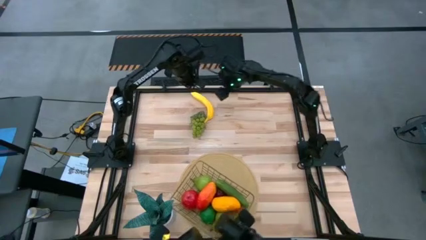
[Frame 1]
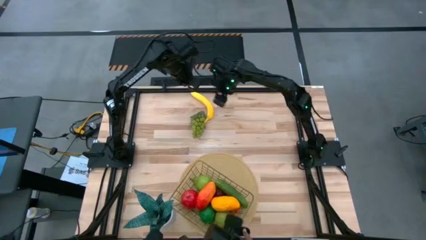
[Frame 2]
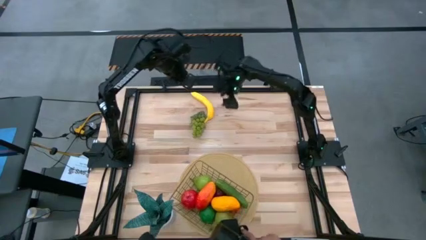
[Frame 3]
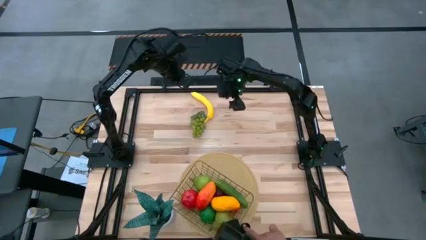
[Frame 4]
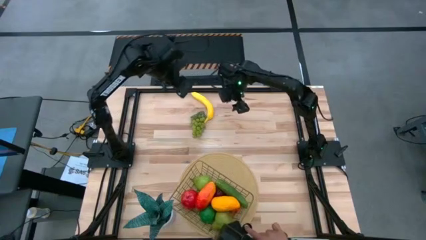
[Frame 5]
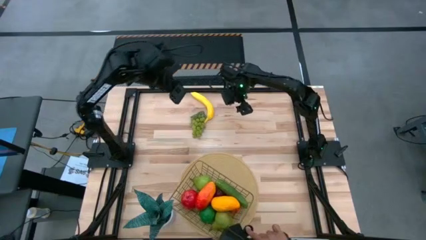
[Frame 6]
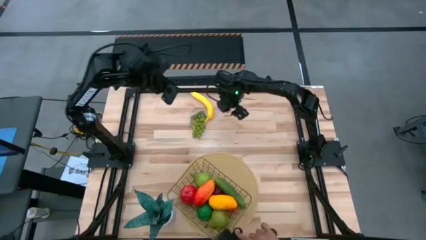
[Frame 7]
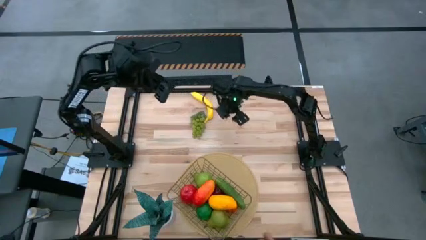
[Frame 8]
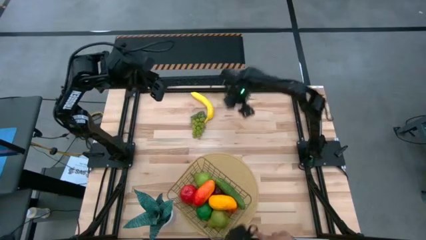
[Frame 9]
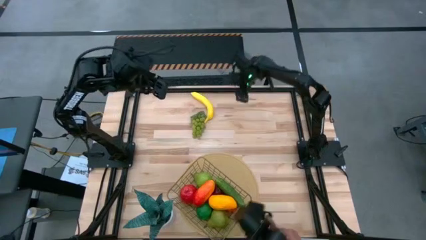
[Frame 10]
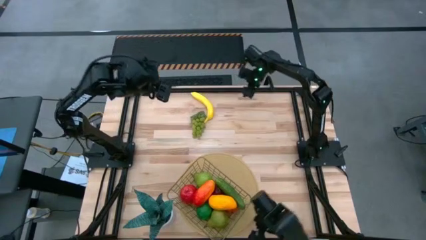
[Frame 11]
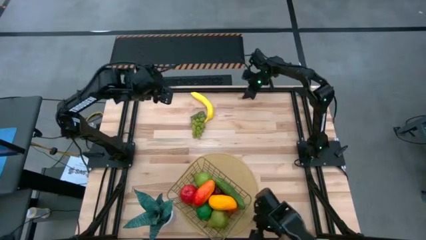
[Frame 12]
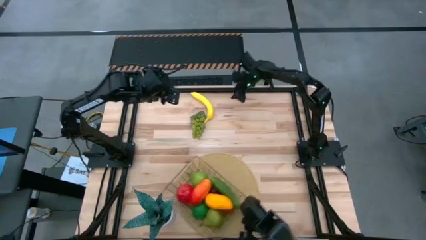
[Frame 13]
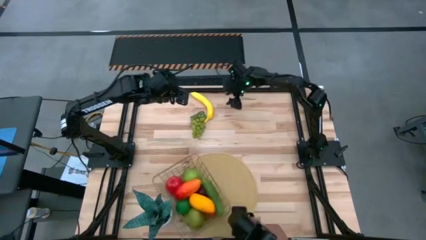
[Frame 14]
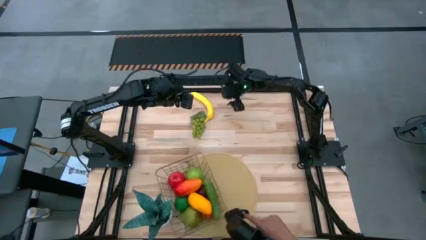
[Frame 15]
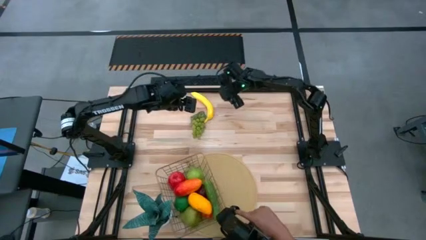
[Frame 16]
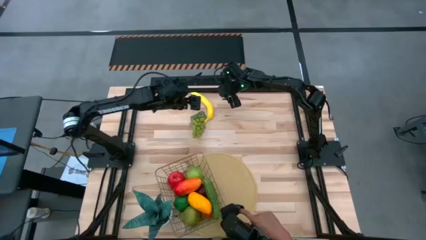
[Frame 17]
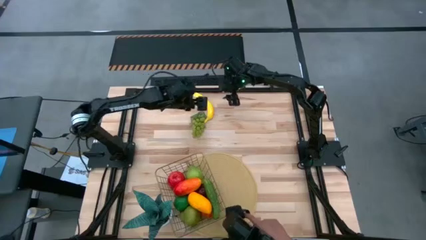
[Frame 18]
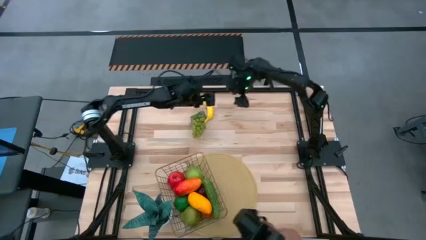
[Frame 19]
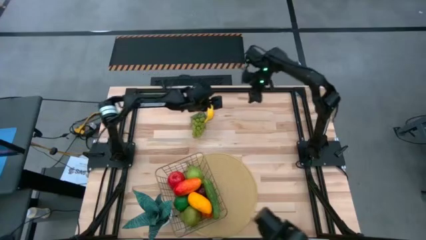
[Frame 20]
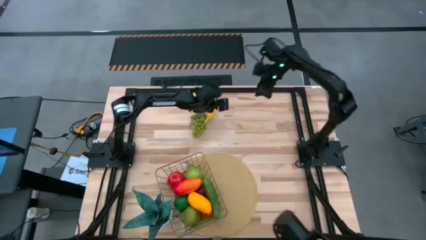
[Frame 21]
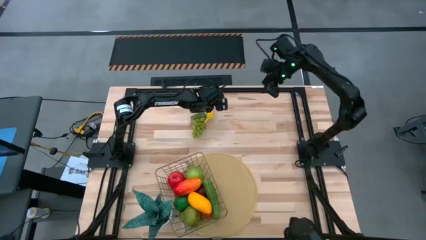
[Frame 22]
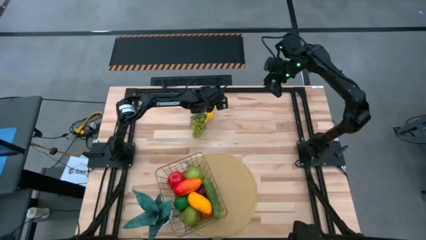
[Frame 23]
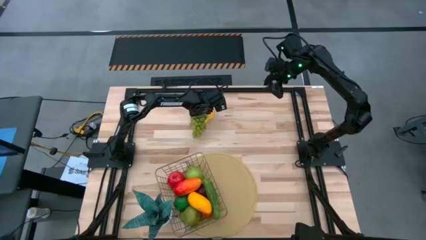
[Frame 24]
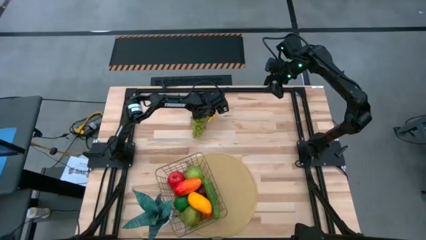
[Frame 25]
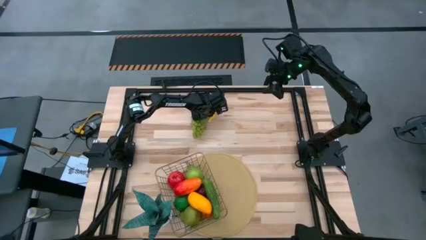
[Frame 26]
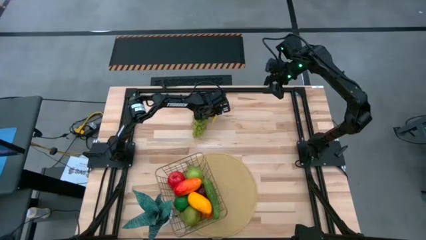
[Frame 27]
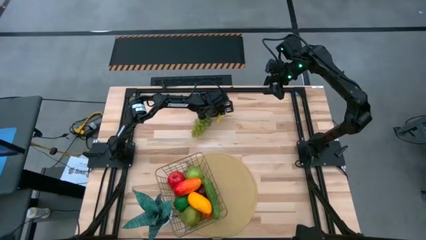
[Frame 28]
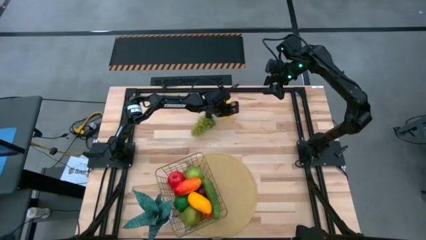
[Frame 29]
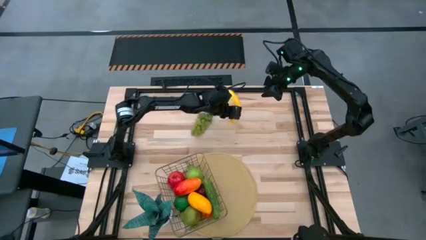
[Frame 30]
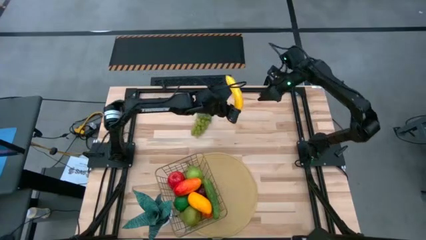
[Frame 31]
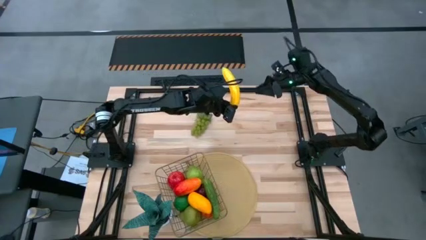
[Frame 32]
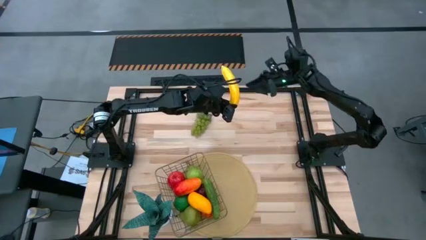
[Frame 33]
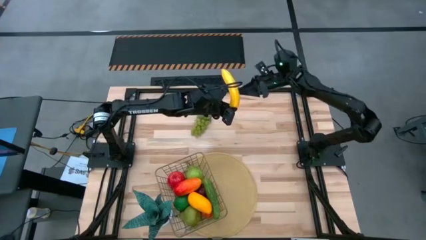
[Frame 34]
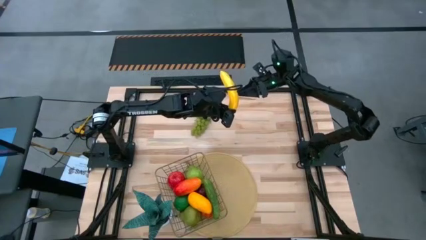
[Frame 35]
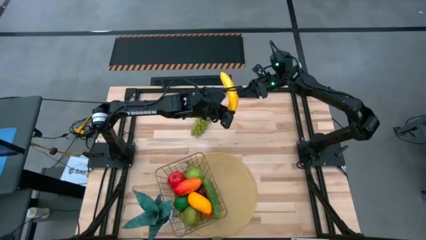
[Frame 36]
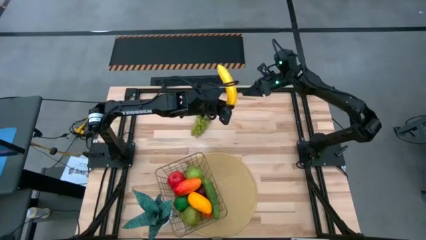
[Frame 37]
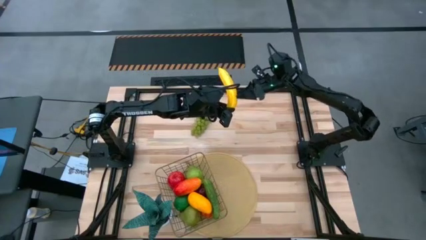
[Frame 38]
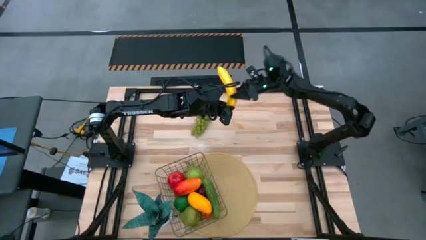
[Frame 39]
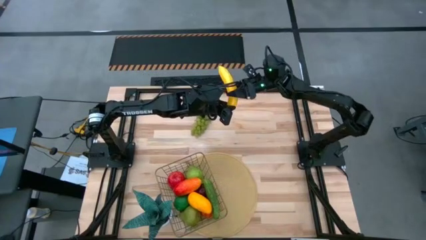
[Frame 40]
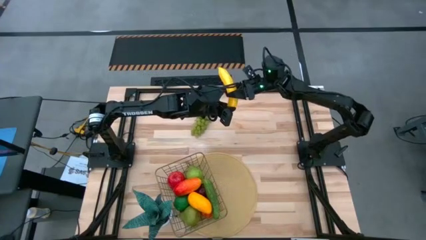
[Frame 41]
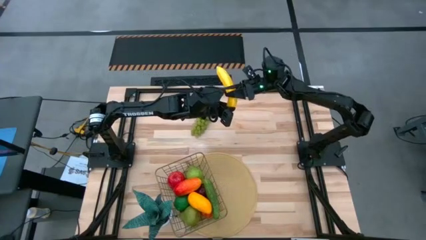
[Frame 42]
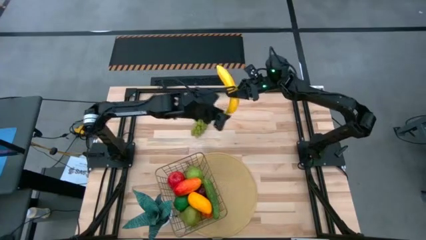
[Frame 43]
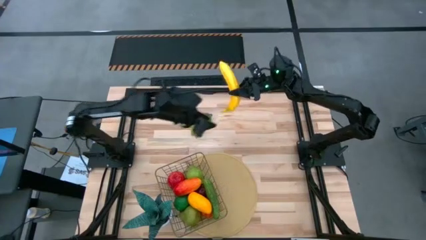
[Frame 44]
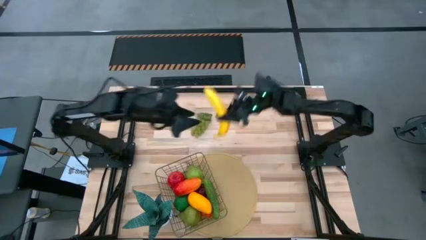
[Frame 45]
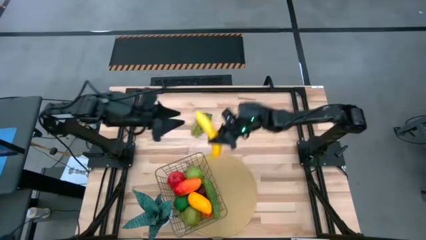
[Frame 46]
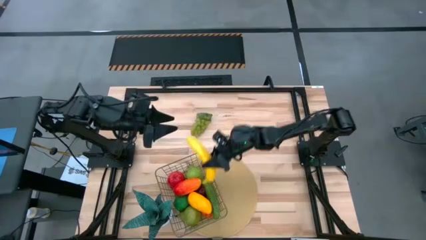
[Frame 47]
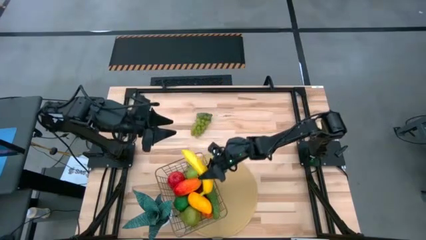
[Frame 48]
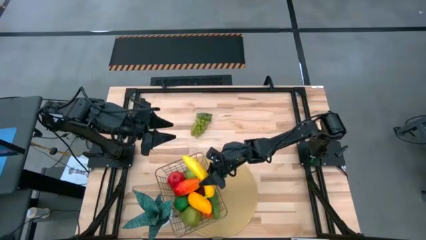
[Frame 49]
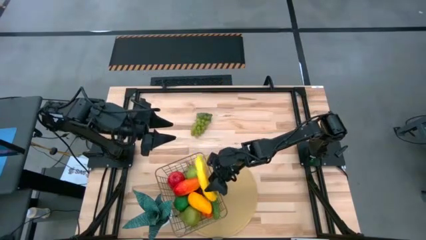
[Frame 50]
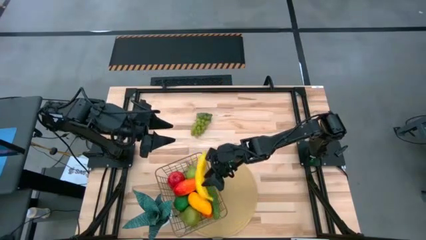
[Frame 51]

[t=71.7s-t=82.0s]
Task: Build produce basket
Put the banana into the wire basket

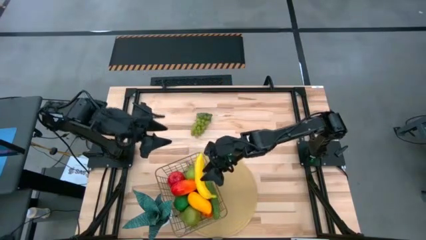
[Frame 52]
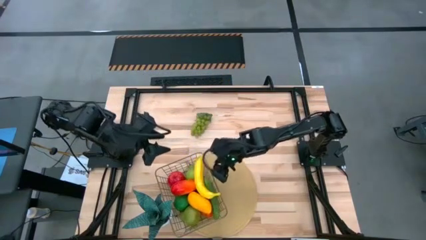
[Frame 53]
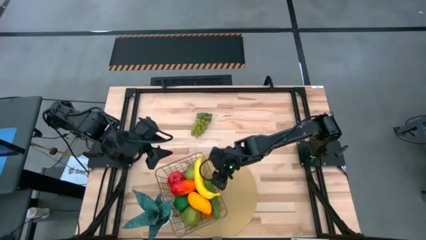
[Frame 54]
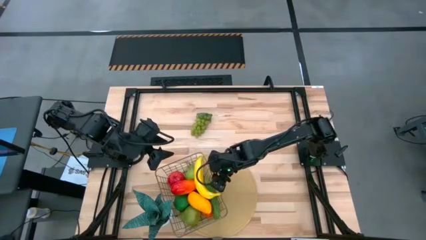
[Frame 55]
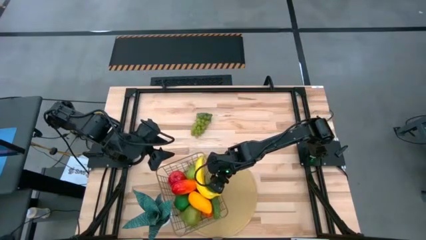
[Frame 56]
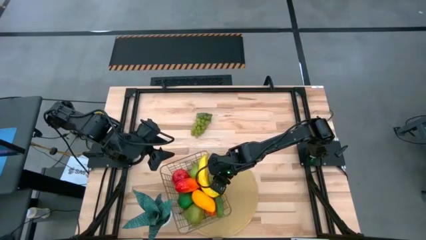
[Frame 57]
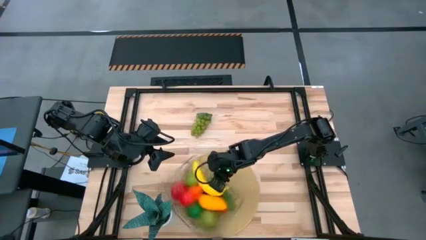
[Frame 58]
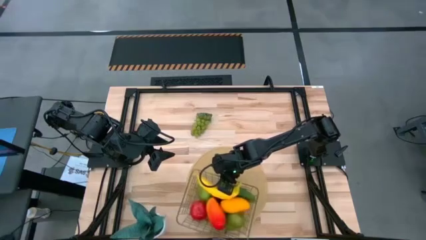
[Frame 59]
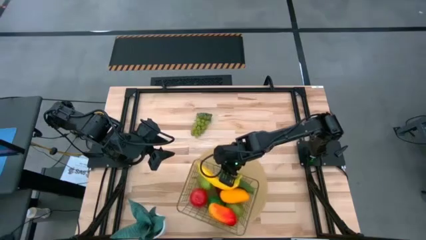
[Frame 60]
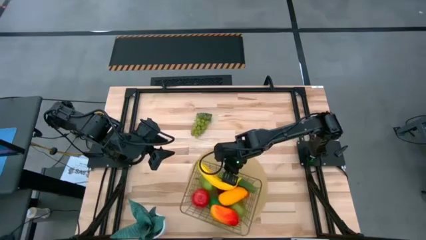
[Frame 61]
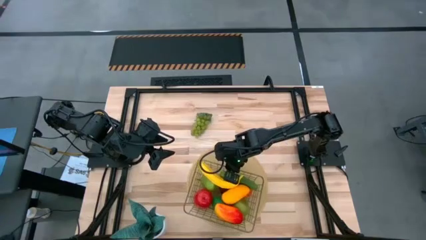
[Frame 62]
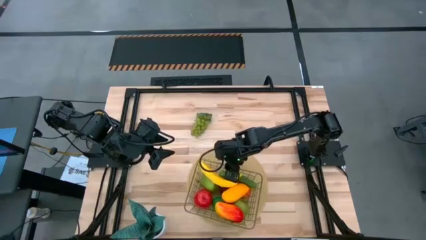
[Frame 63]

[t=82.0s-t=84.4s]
Adjust the wire basket

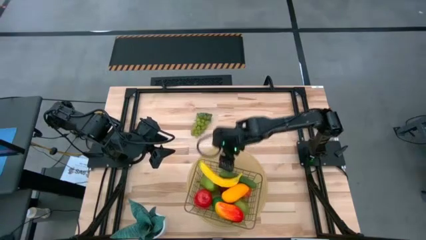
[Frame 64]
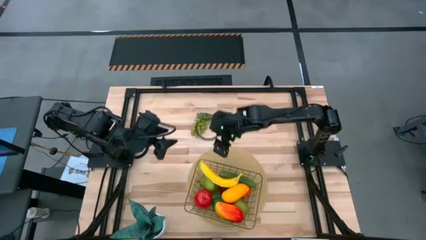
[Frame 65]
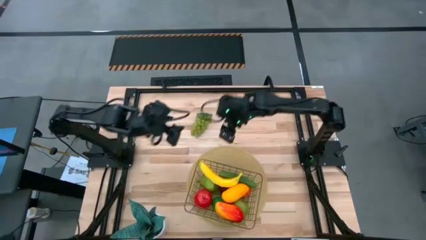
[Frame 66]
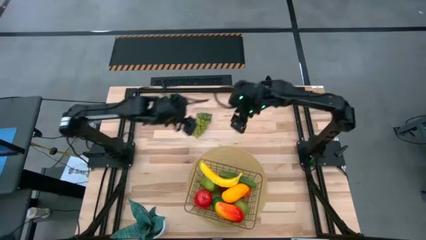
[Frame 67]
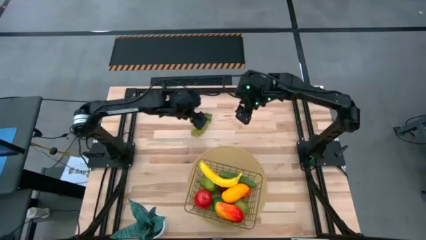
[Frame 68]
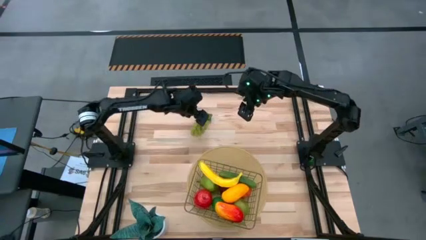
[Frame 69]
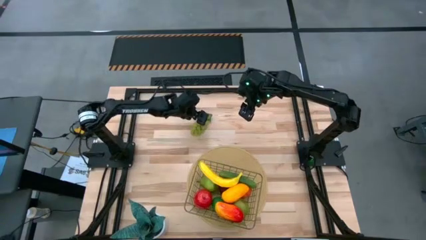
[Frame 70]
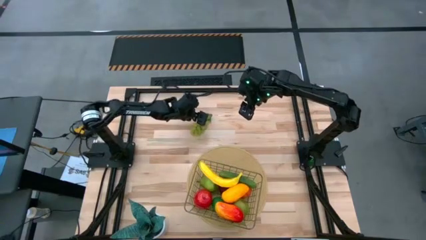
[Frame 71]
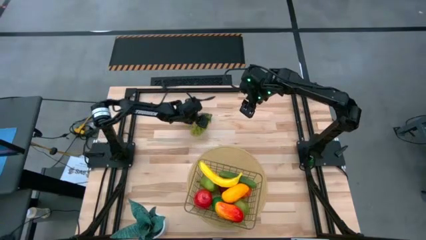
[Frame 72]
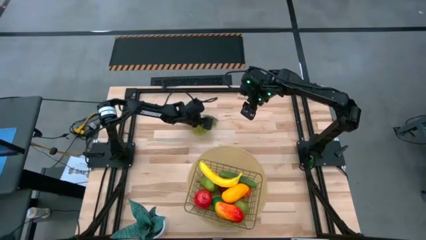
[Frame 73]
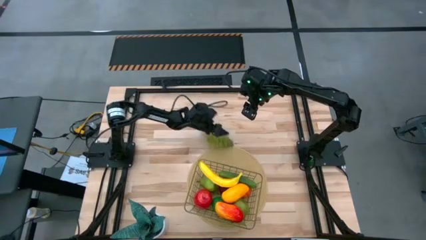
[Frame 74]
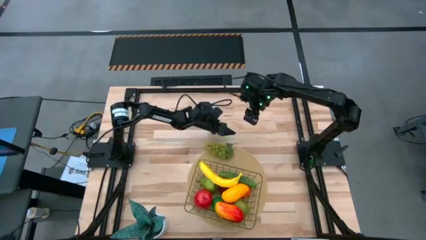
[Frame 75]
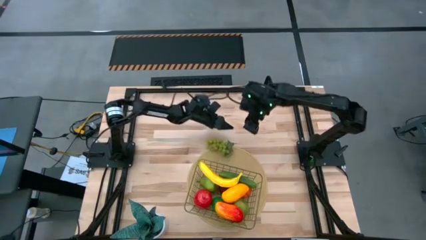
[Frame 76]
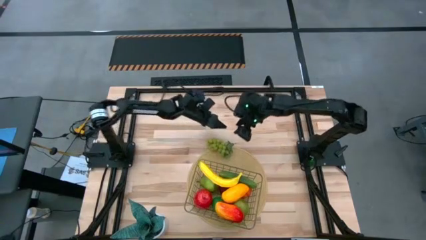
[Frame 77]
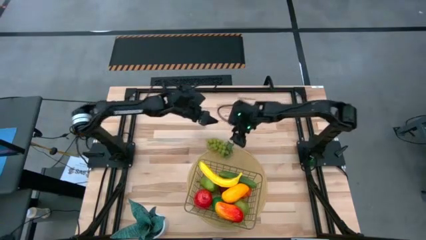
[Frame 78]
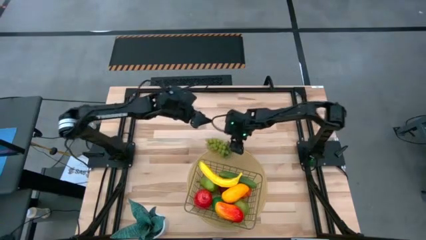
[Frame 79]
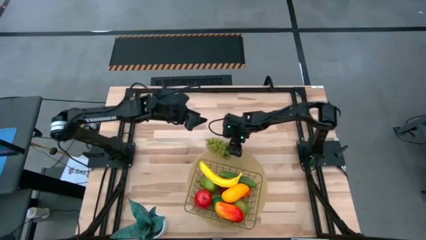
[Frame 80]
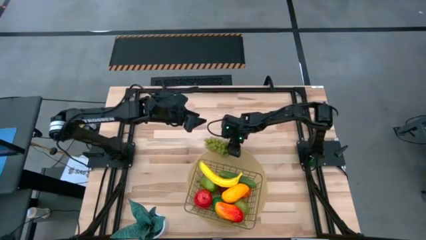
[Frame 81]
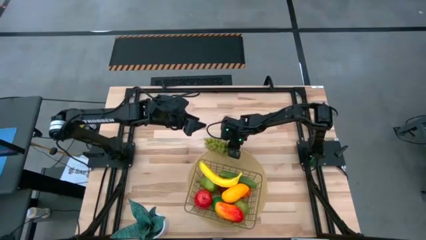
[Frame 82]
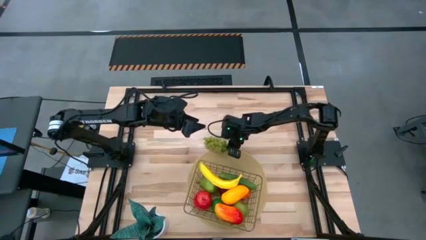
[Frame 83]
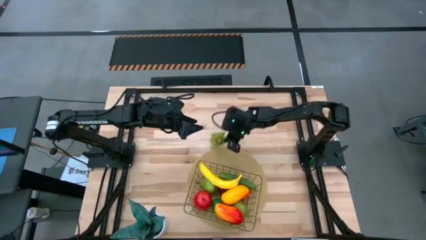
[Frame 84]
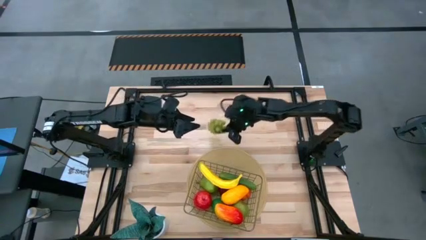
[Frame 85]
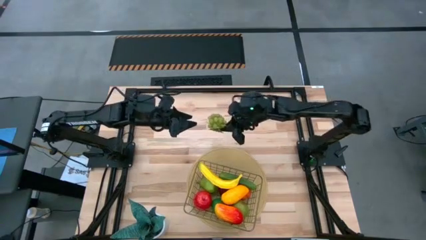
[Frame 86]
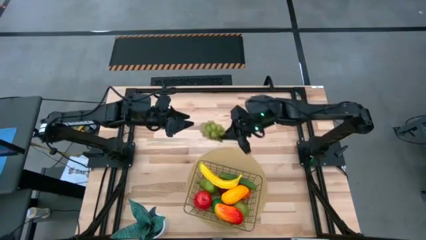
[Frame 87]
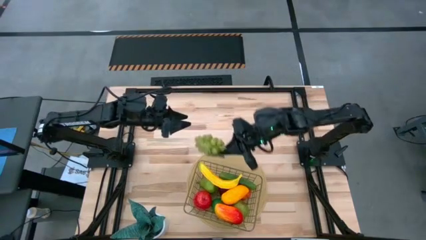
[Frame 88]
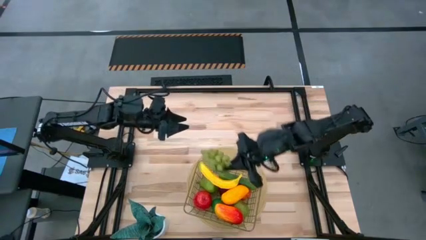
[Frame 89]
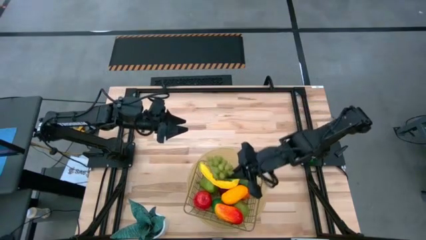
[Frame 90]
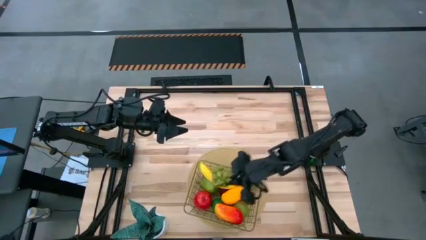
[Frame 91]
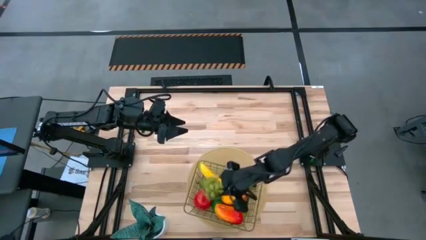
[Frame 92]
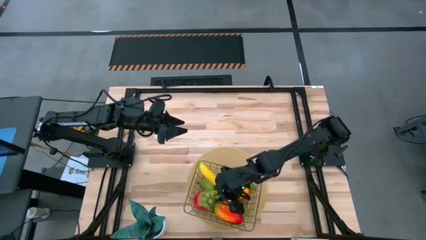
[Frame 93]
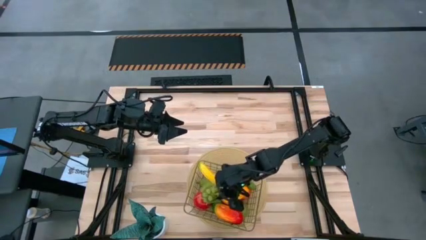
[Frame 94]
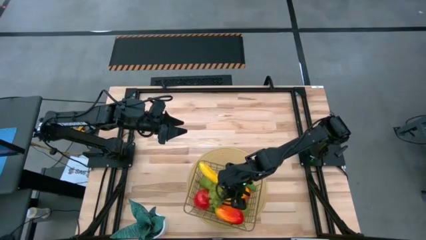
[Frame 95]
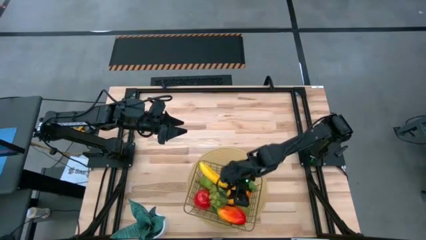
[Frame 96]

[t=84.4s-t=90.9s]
Put the grapes into the wire basket
